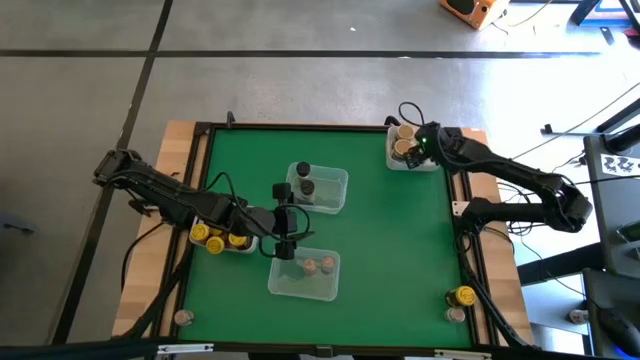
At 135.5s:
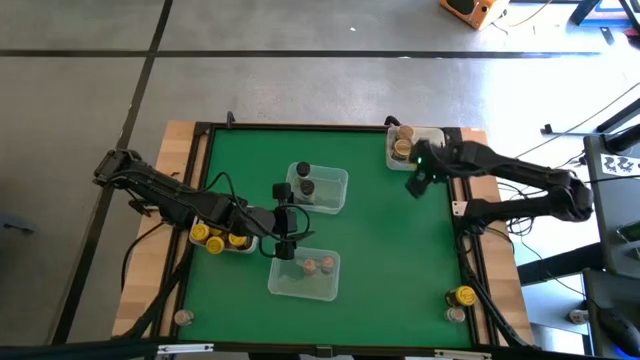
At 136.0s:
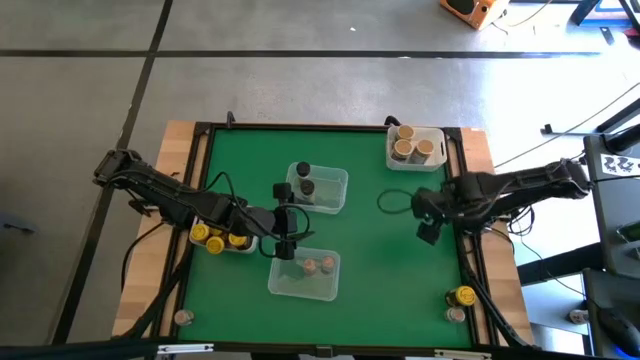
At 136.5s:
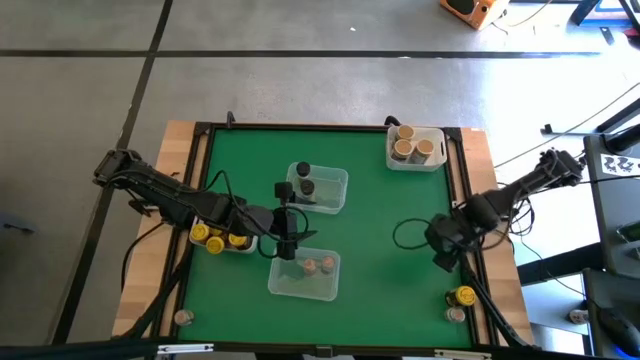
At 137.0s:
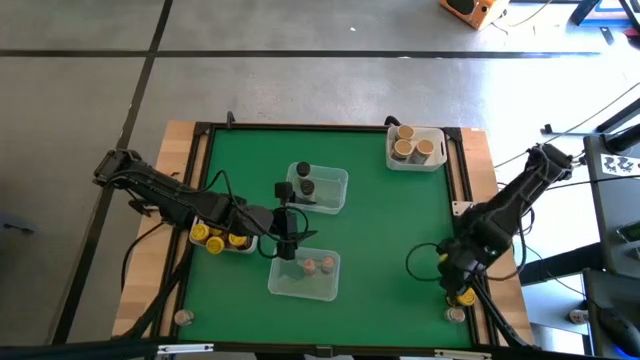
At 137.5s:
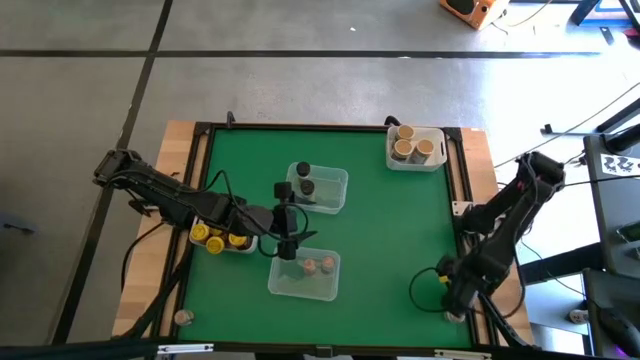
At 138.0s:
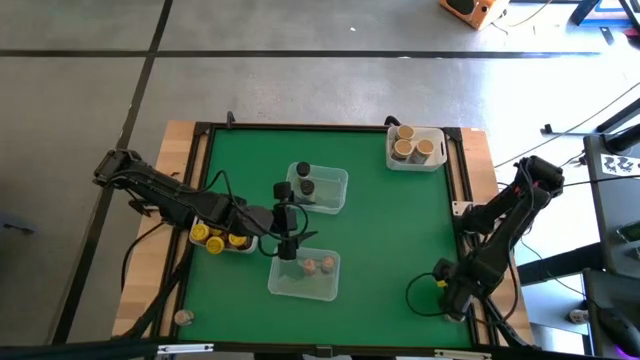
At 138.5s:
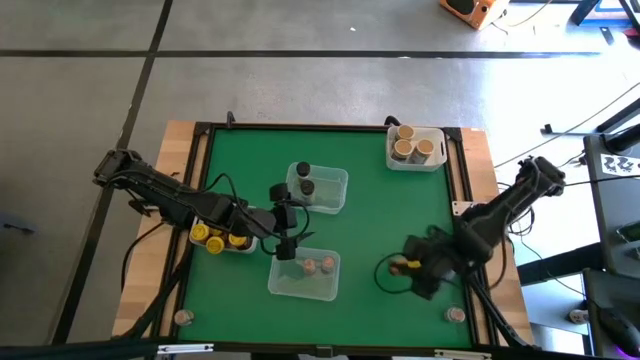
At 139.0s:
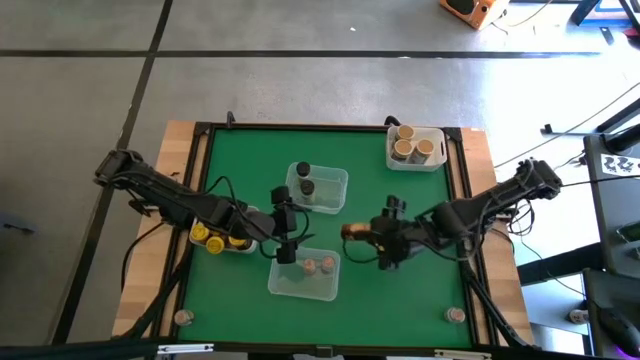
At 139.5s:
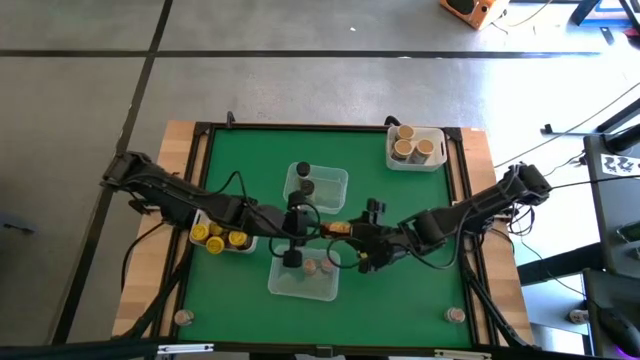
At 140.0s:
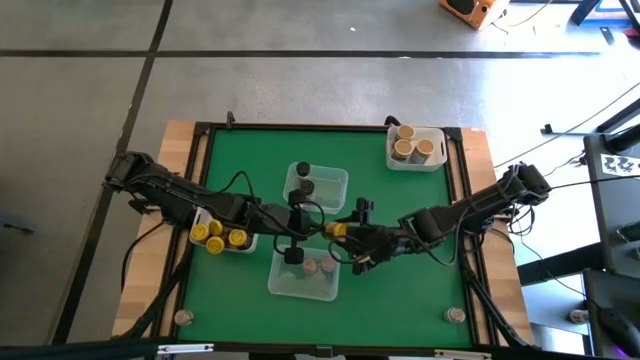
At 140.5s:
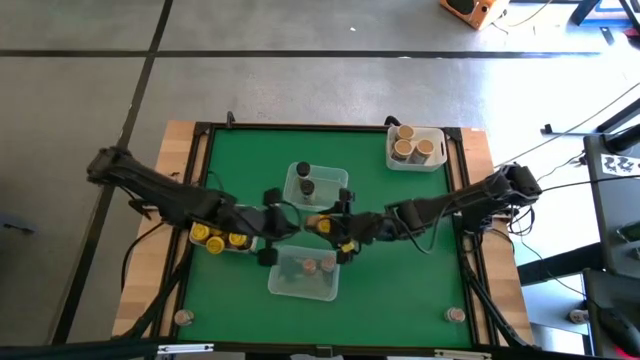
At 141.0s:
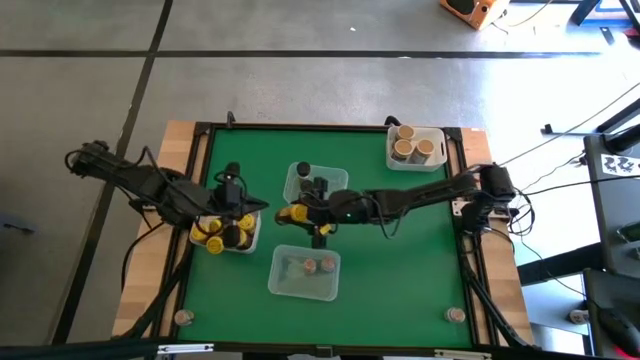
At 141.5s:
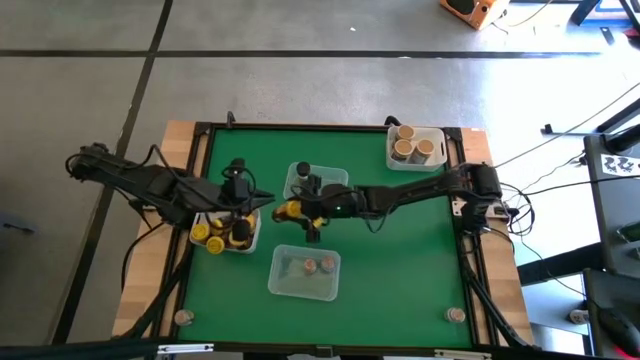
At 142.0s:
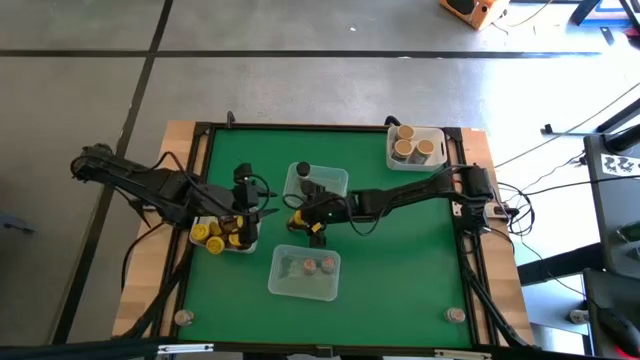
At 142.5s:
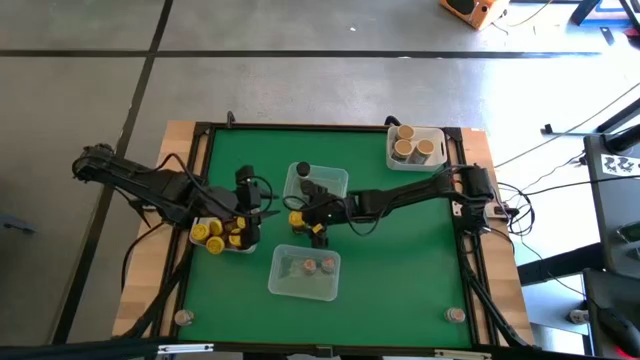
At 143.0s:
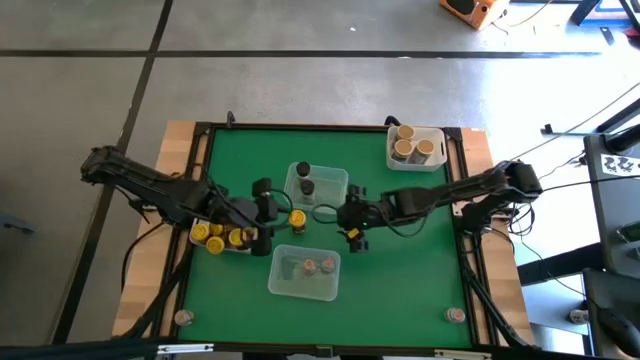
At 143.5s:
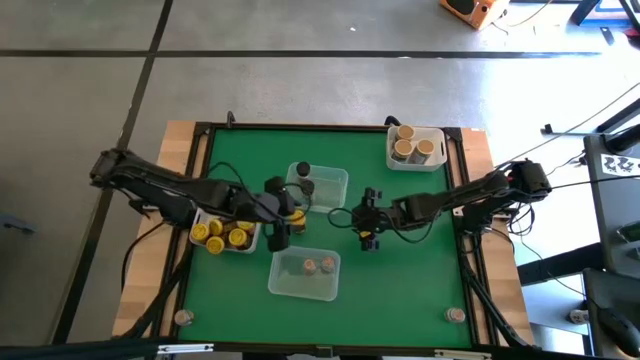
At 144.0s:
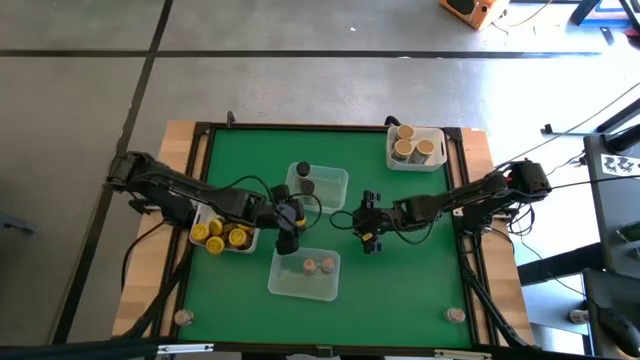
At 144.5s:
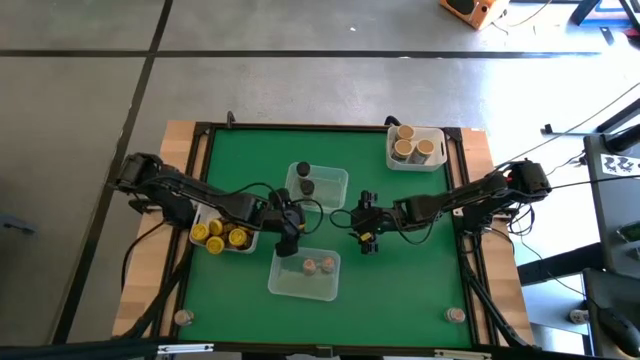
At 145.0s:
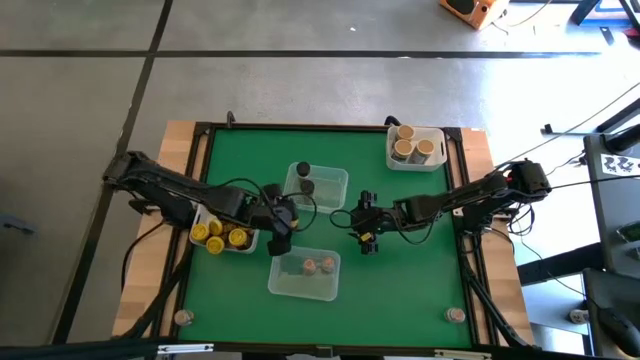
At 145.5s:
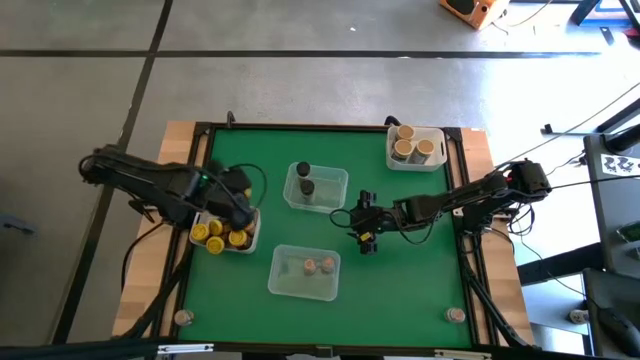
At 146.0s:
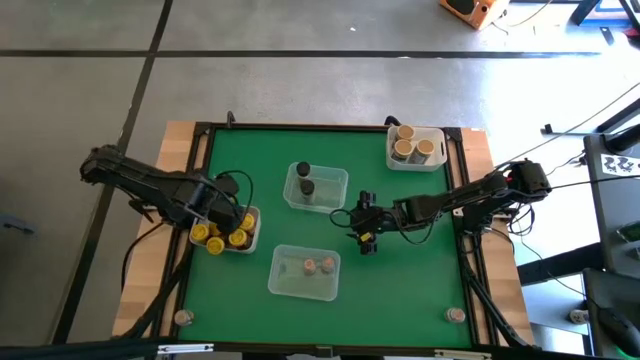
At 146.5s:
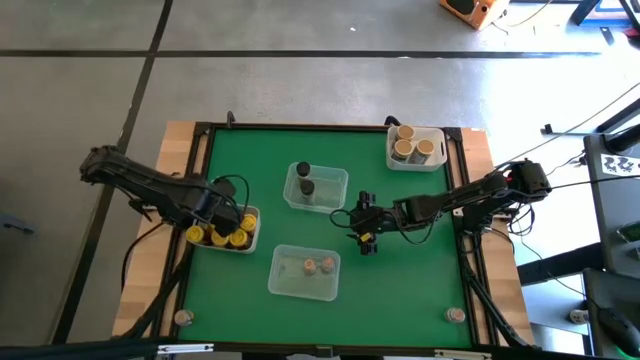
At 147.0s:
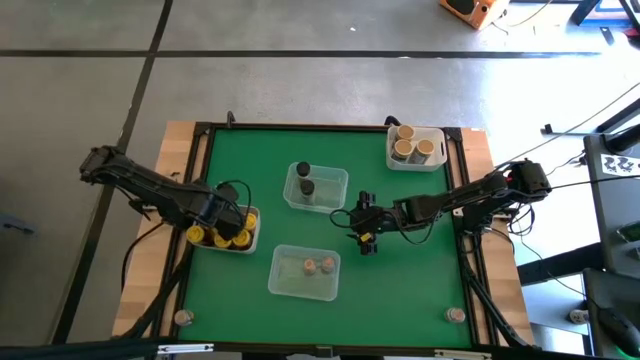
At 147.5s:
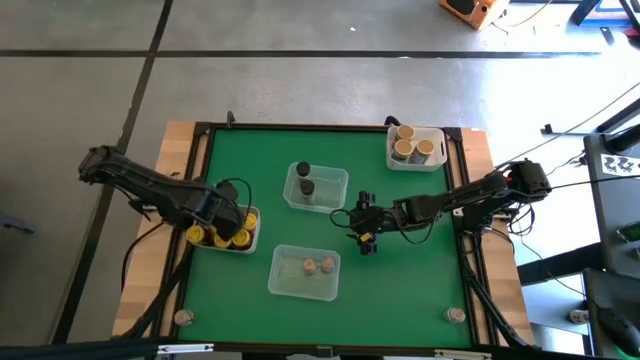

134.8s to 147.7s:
Task: Sort spices by type
Put the yellow spice can into the bottom white bin

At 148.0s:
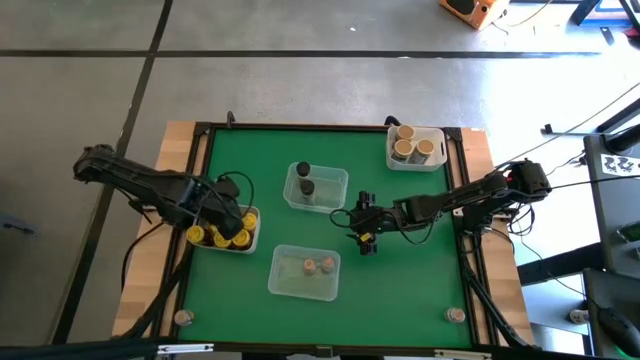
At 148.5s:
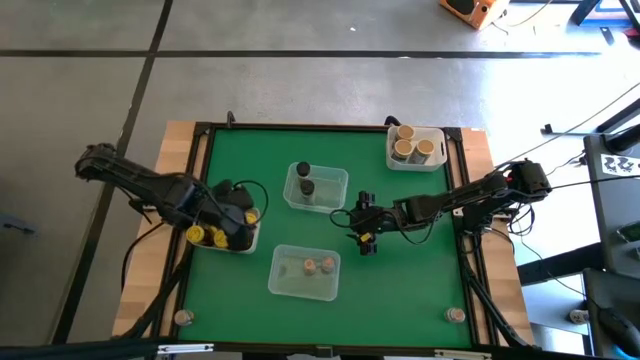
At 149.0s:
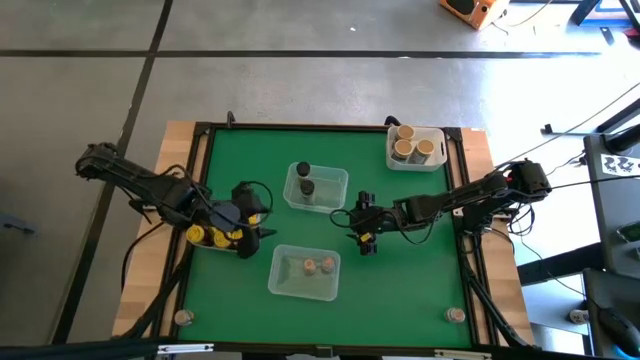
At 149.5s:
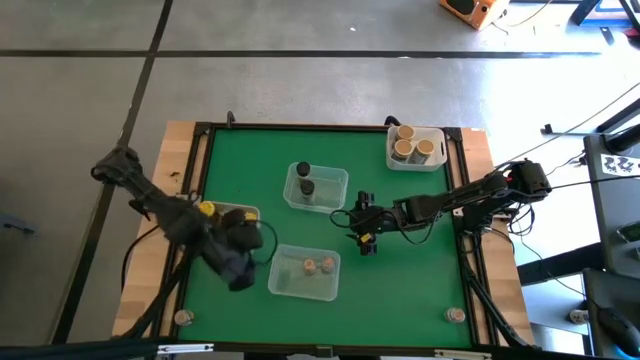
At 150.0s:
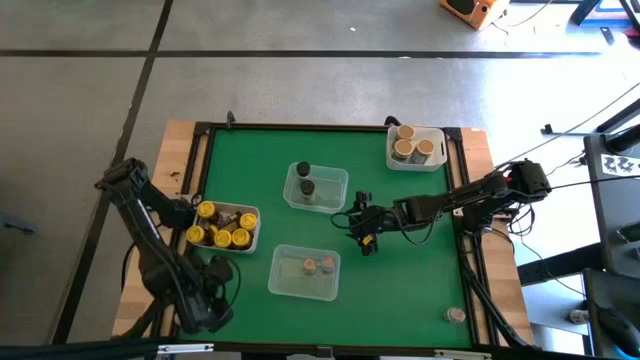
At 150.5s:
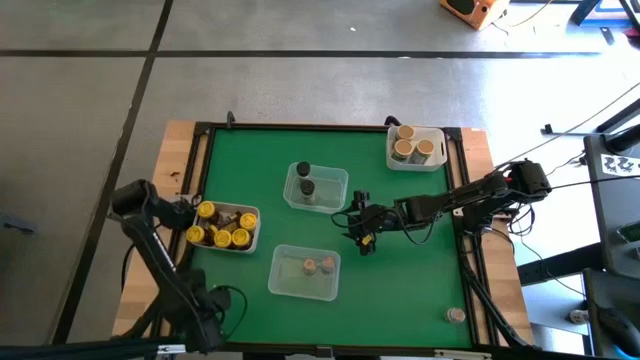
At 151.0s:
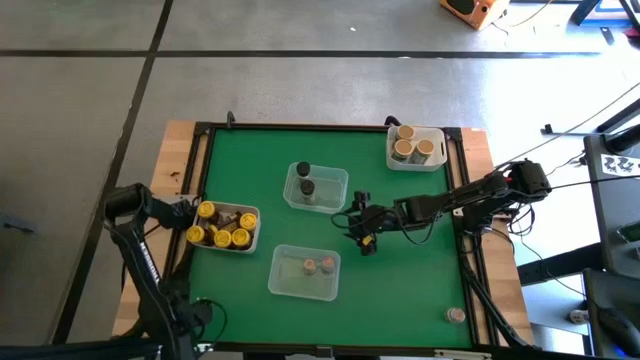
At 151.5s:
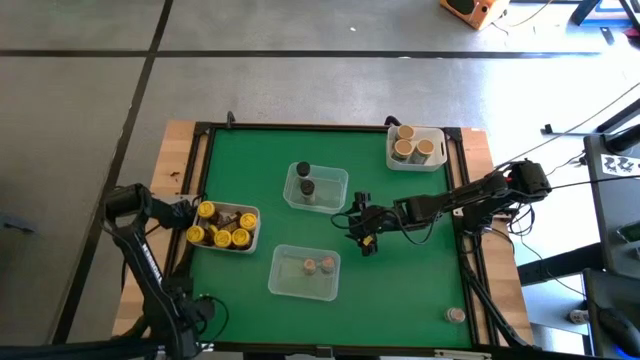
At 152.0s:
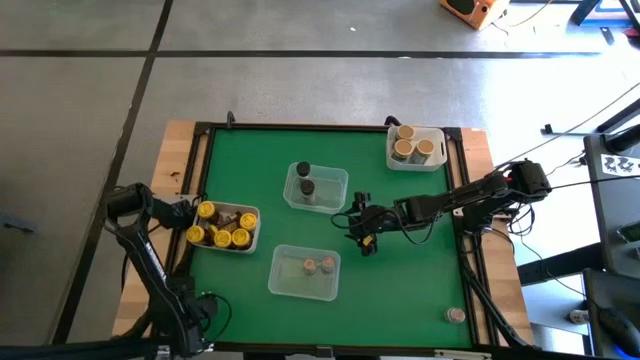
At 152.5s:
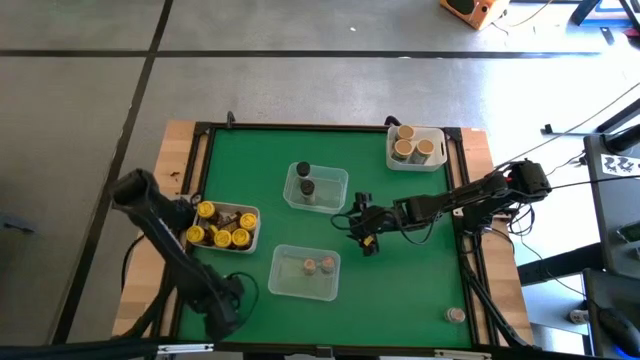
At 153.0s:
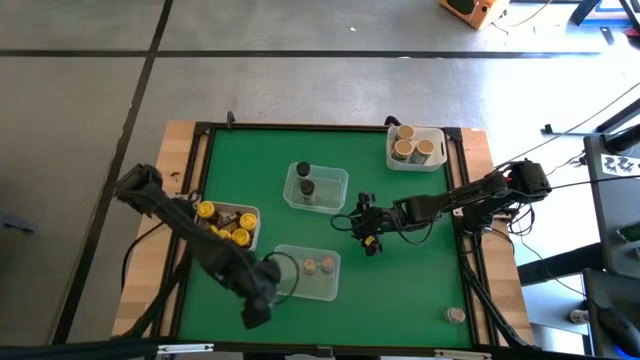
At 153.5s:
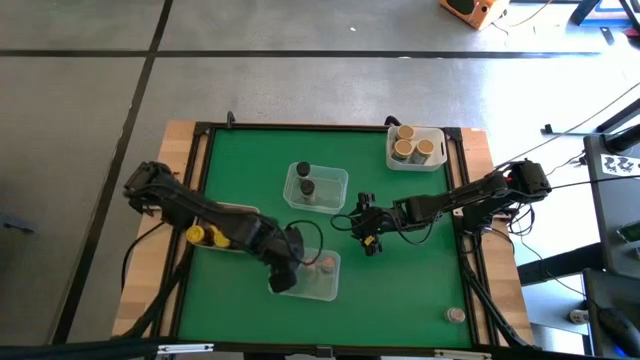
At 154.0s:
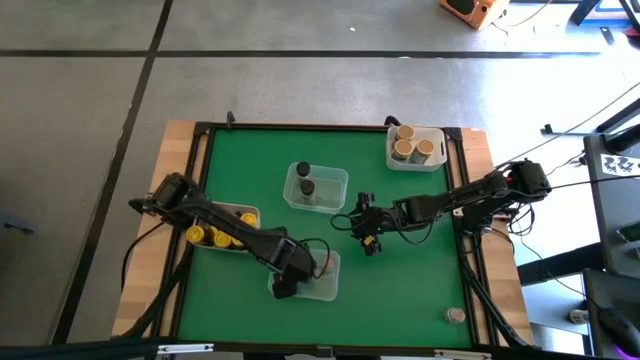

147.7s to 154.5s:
Put the brown spice bottle into the bottom transparent bin

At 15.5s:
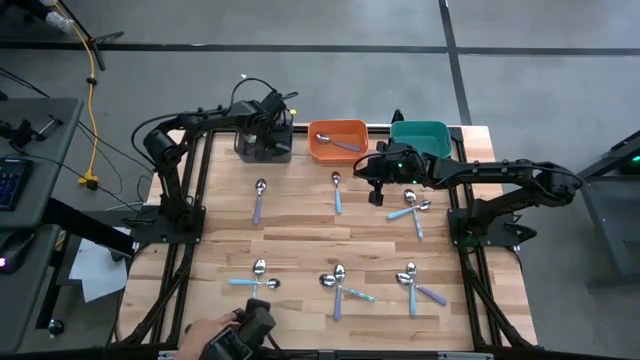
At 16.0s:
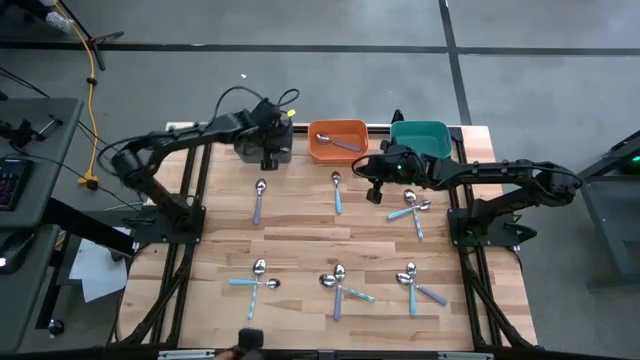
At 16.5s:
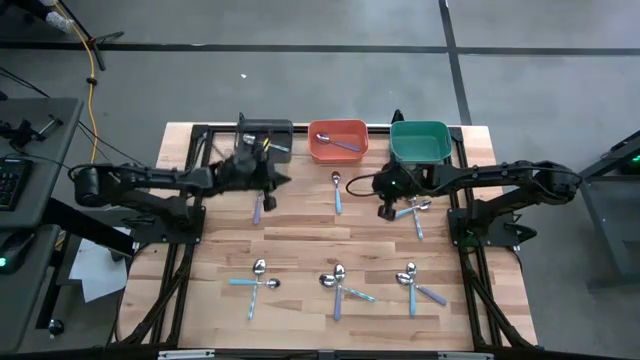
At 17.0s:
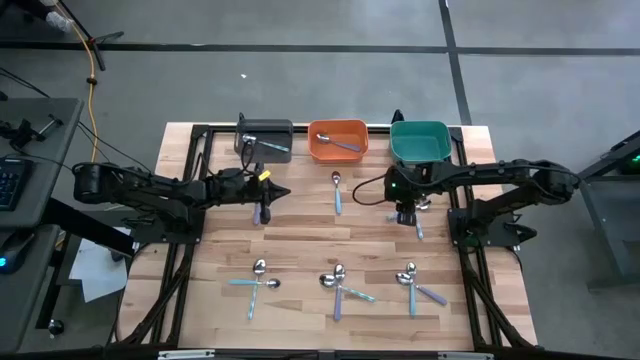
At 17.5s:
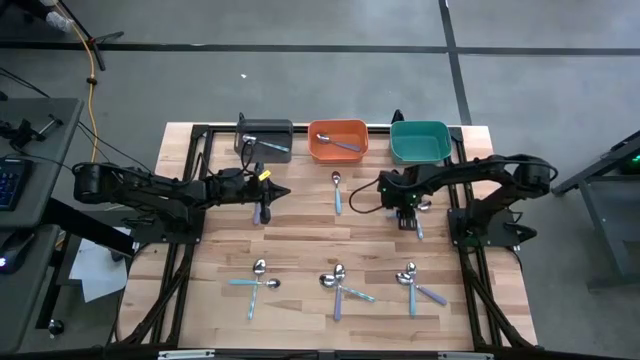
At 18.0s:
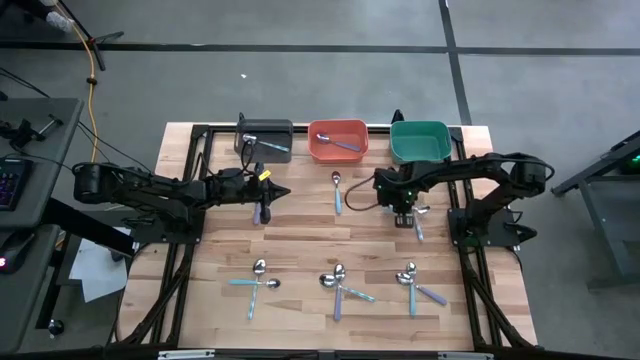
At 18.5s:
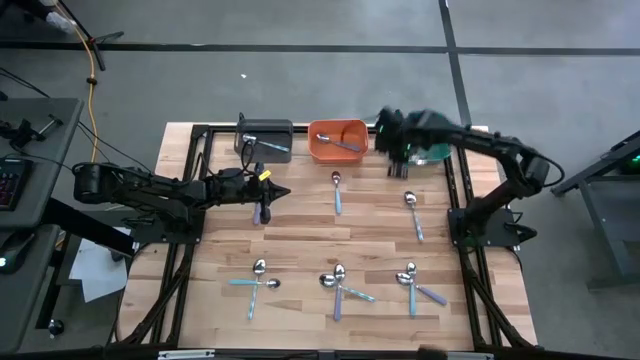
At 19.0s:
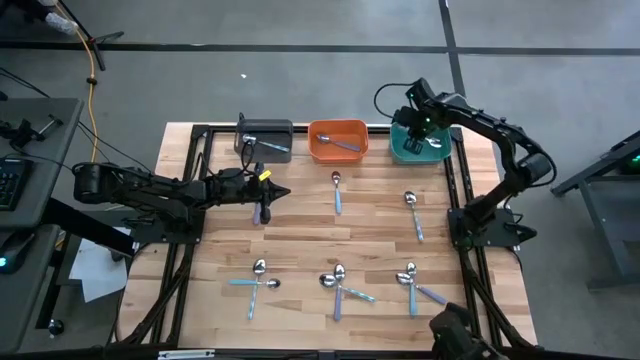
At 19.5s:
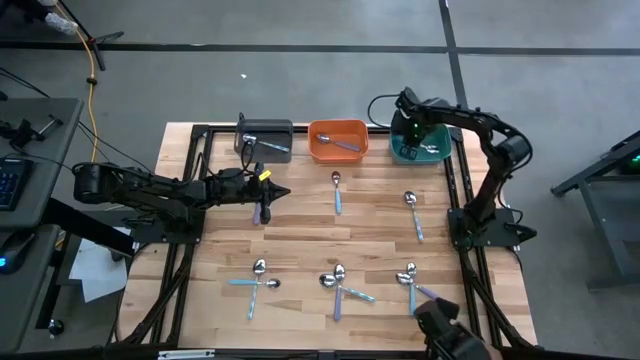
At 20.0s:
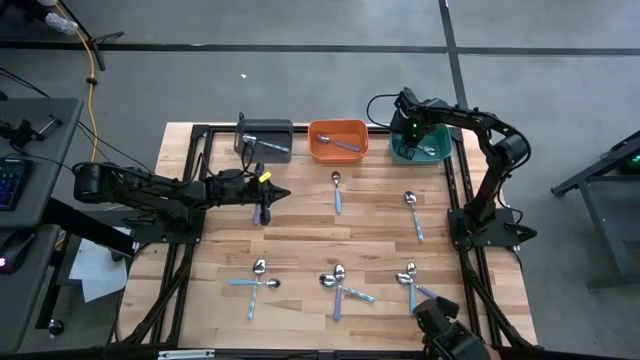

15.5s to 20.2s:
Task: Sort silverware by color (type)
Put the blue spoon into the green bin
